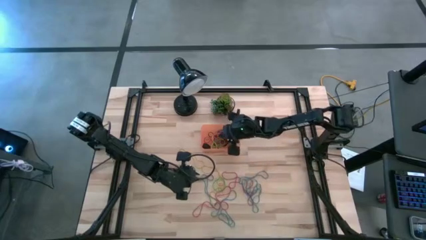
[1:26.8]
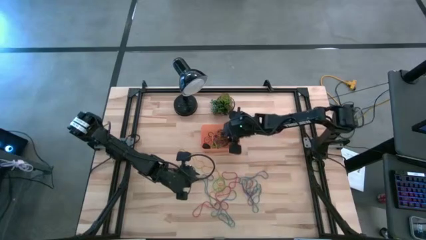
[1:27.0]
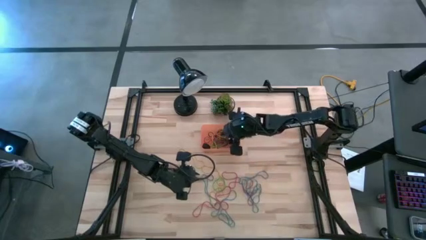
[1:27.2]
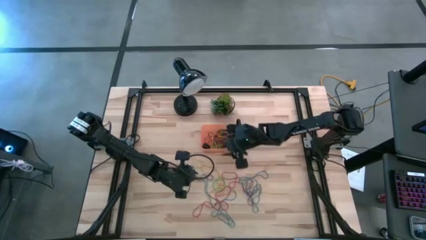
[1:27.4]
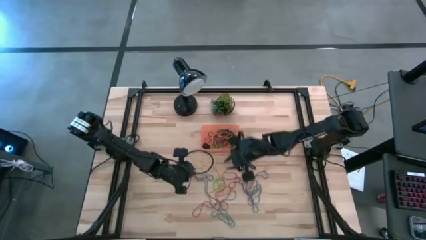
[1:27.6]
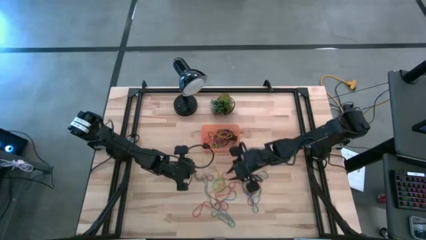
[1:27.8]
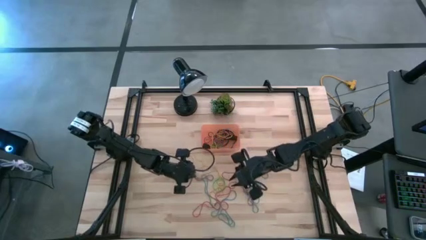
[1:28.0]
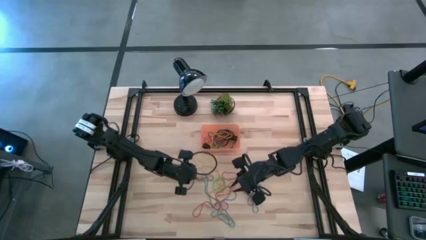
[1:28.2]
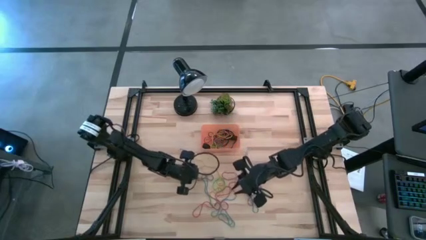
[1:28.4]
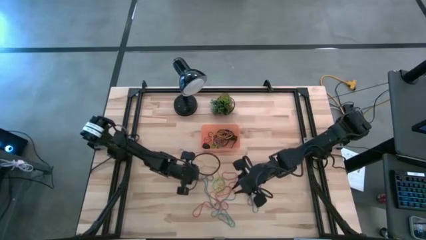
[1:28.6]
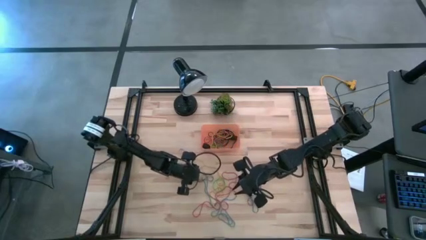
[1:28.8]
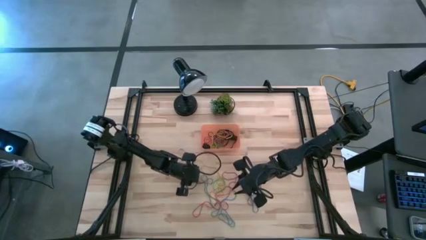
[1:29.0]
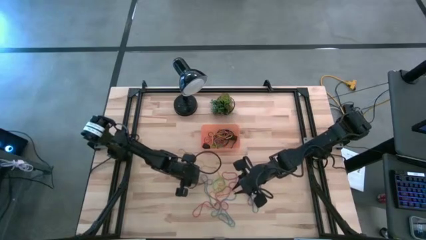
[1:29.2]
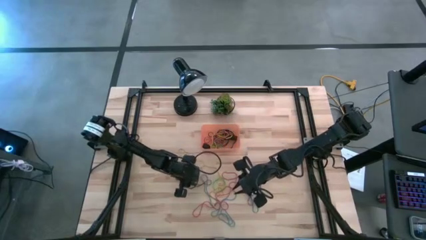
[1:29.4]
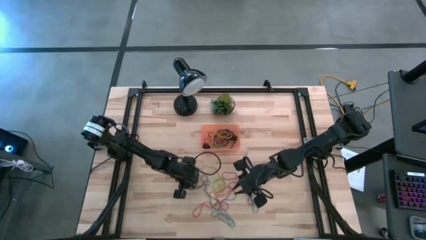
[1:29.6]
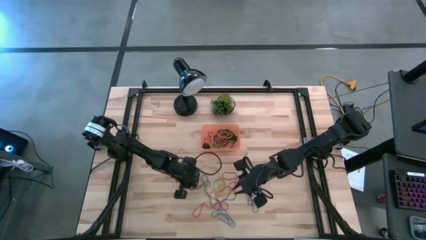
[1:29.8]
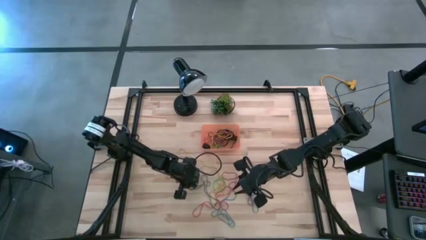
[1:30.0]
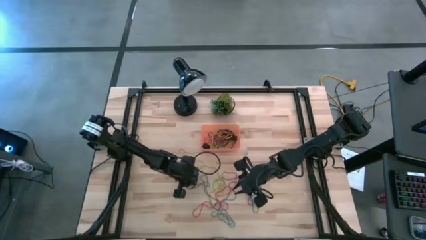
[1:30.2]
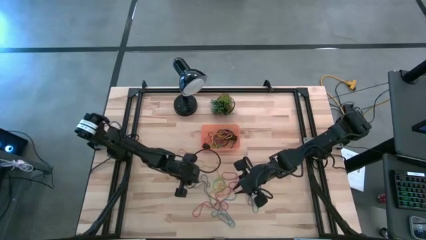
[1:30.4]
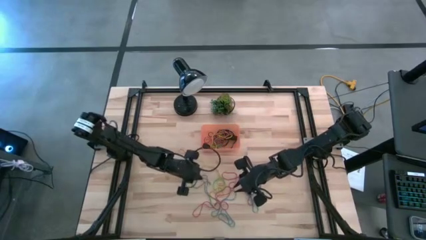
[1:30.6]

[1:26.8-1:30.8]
Task: Pick and place rubber bands into bin
Put the violet rubber band into the orange bin

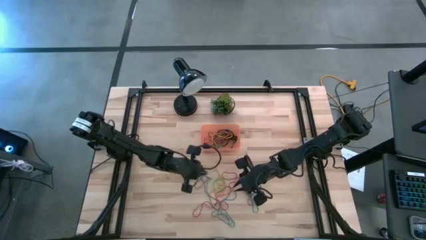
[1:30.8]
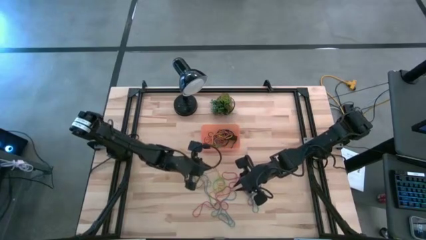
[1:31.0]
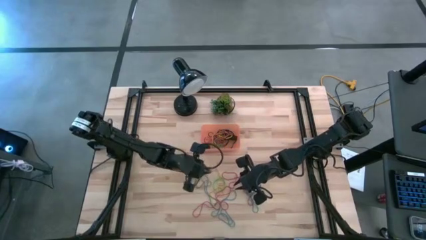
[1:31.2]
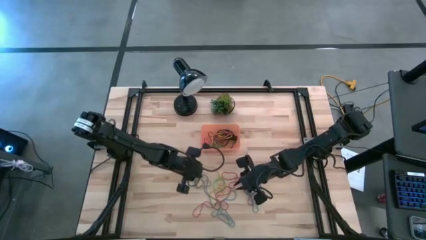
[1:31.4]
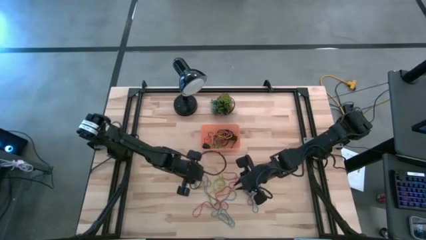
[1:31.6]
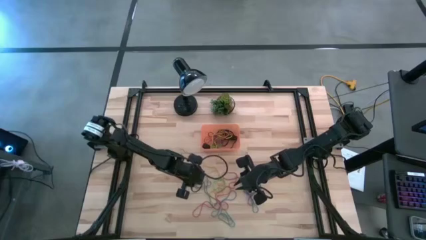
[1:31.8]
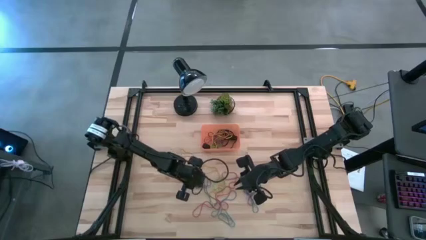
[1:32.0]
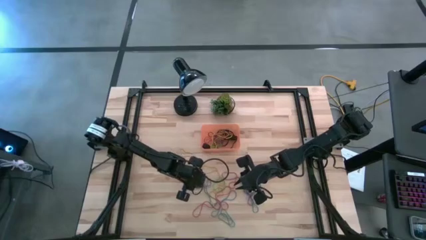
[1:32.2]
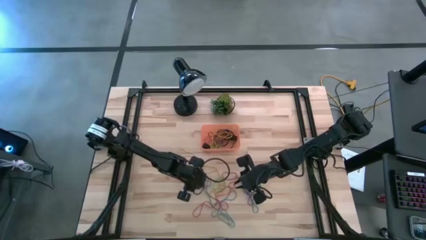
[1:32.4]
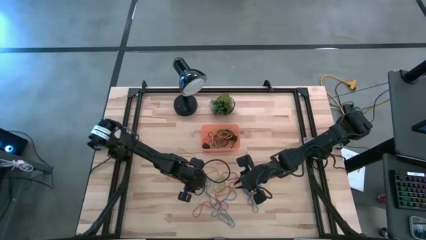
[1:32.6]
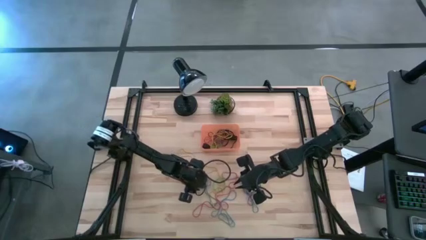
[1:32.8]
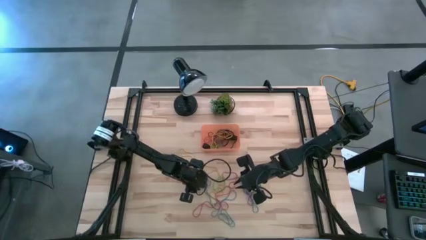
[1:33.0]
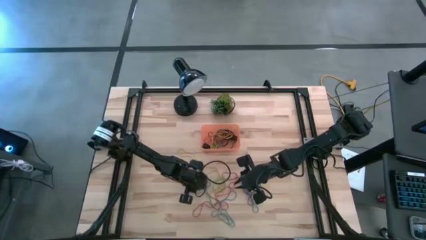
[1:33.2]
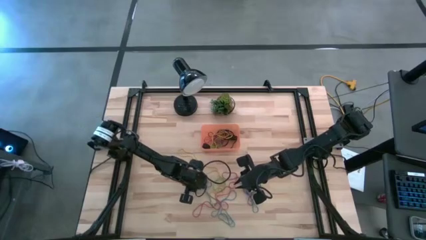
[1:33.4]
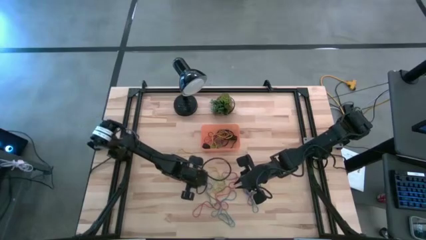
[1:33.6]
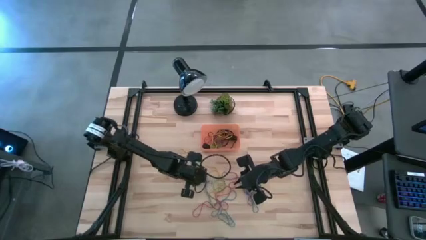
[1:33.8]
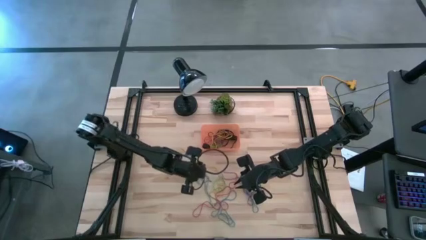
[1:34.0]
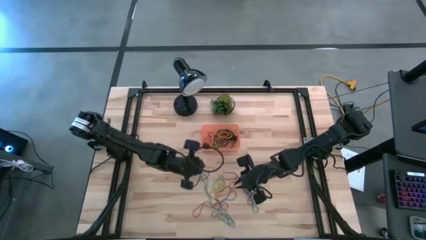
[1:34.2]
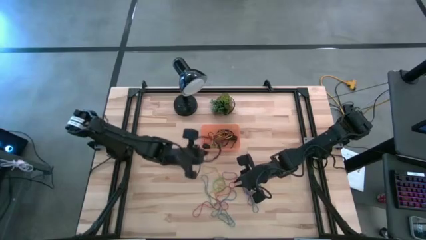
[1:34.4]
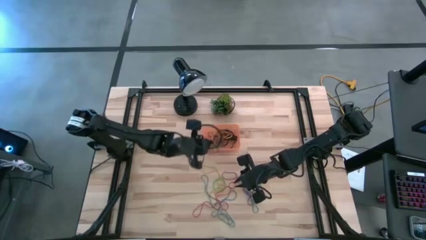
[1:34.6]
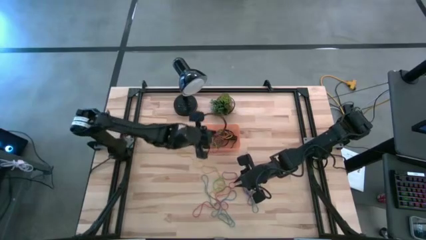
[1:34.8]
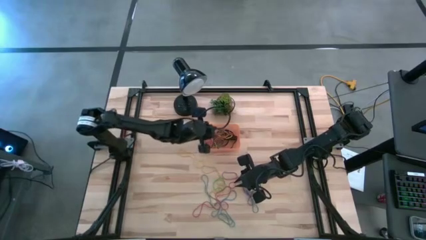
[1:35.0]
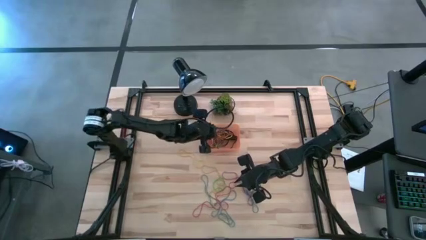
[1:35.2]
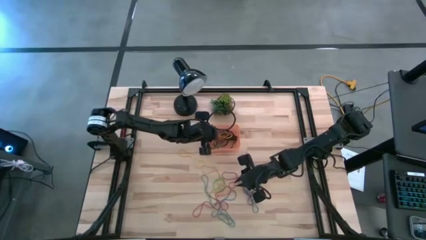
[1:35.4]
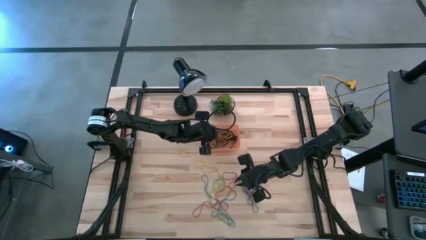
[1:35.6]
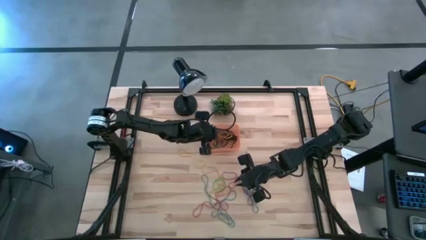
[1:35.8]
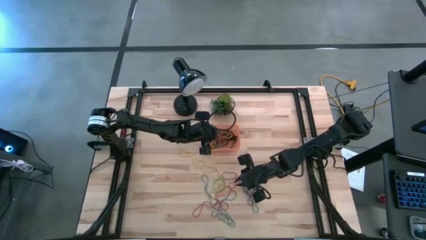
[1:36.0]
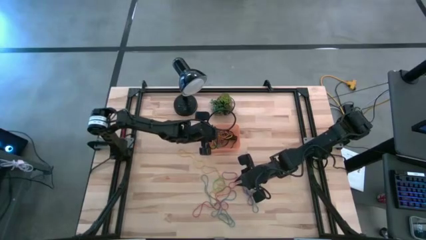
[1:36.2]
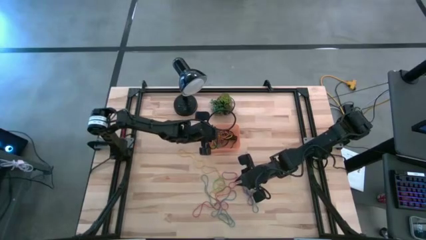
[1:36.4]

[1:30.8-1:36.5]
Put the violet rubber band into the orange bin

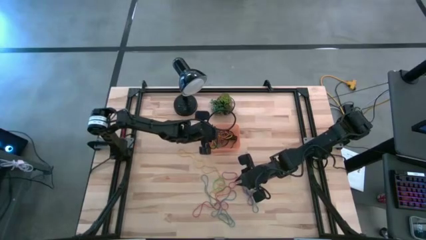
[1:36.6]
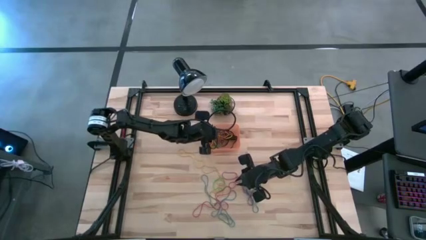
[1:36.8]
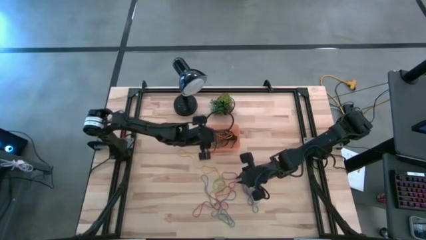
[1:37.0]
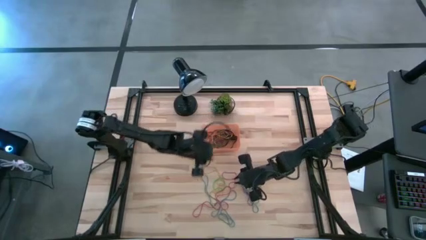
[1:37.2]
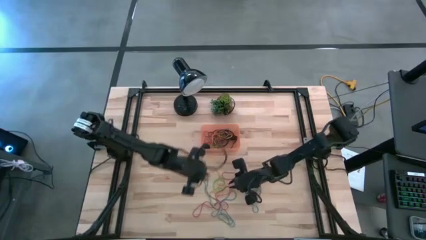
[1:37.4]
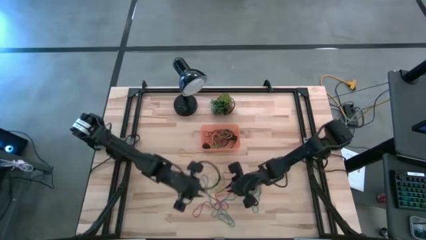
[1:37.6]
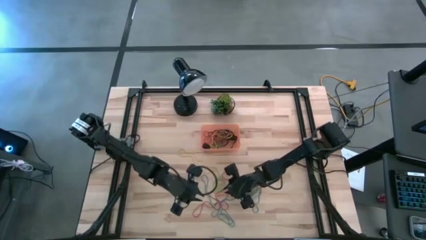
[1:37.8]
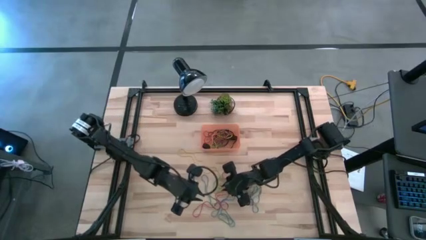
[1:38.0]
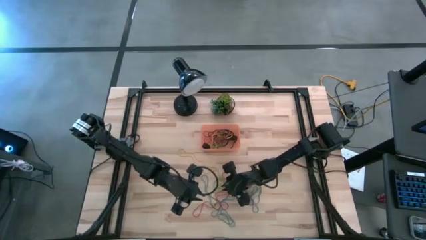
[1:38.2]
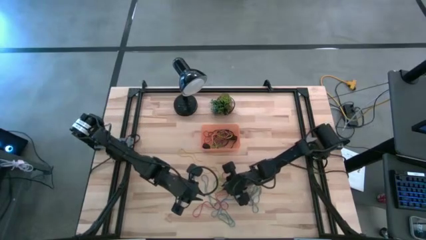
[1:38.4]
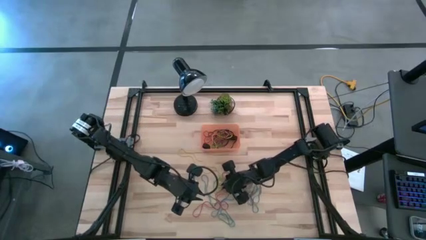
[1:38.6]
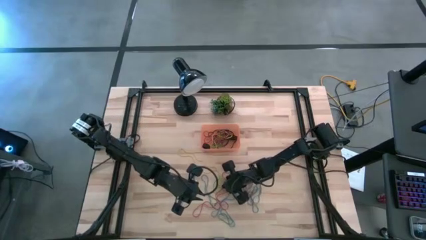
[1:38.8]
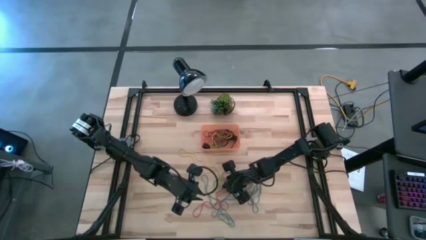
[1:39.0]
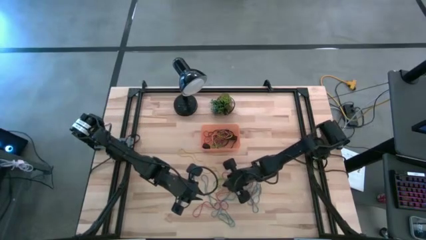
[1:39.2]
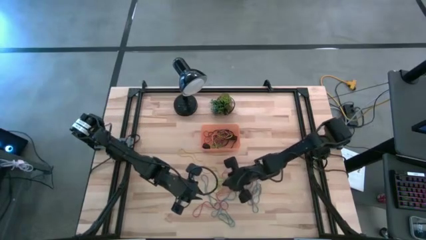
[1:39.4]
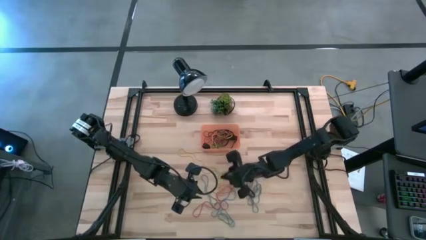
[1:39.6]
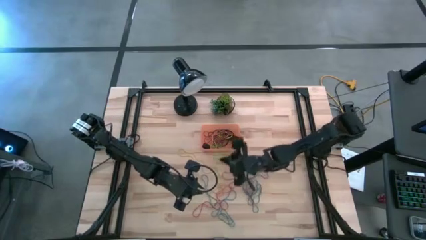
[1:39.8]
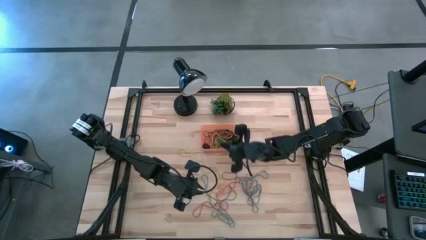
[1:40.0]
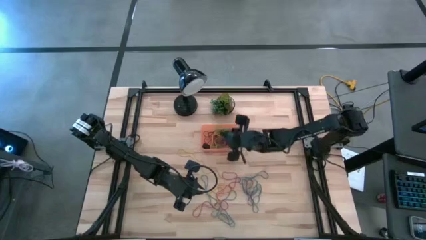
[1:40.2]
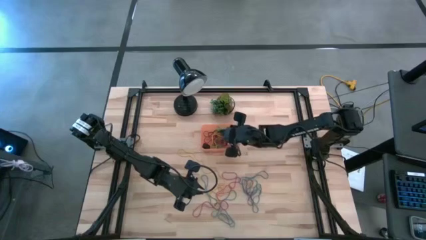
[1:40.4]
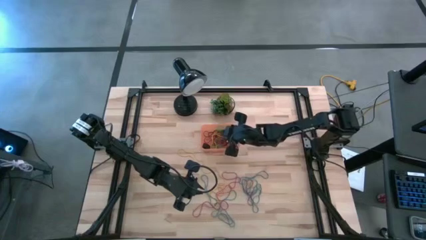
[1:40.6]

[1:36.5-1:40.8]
Put the green rubber band into the orange bin

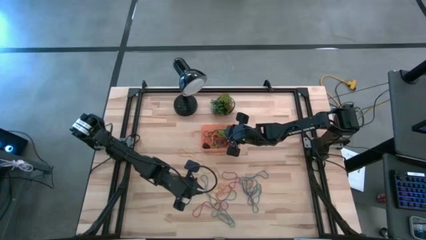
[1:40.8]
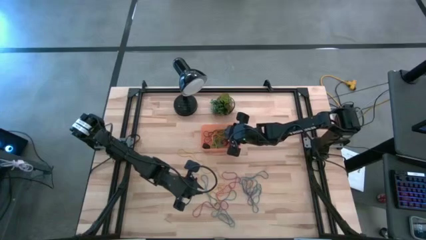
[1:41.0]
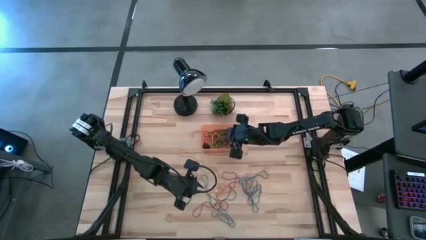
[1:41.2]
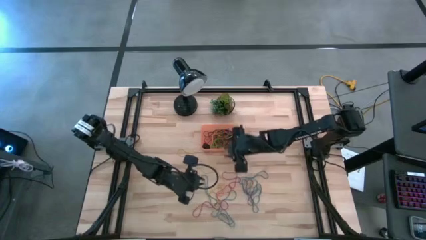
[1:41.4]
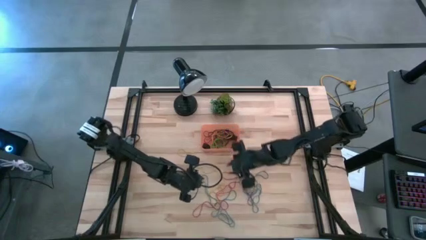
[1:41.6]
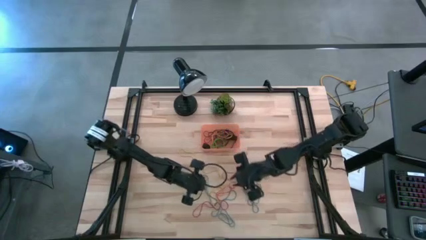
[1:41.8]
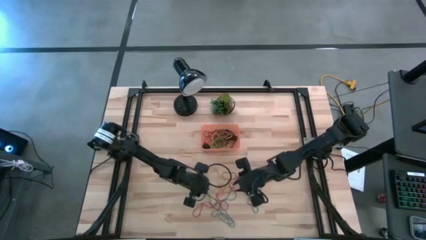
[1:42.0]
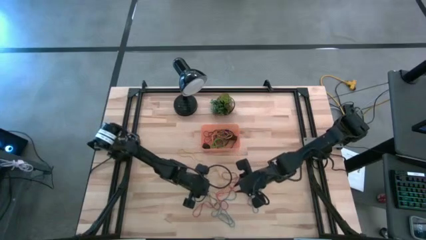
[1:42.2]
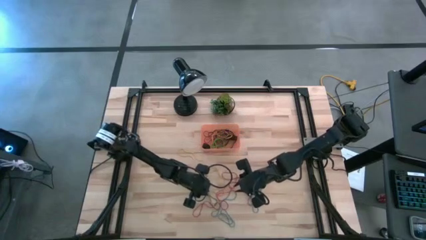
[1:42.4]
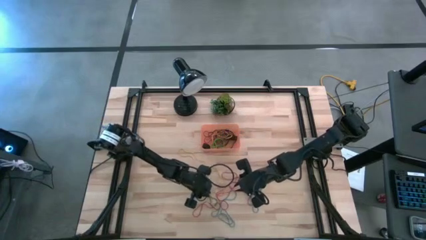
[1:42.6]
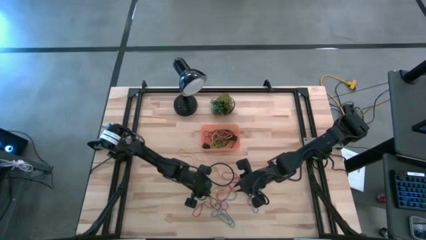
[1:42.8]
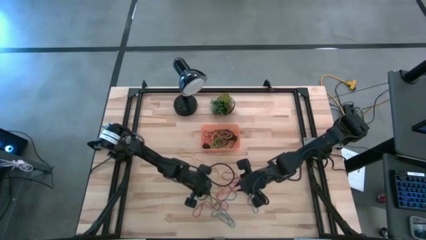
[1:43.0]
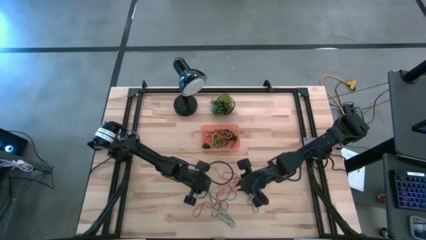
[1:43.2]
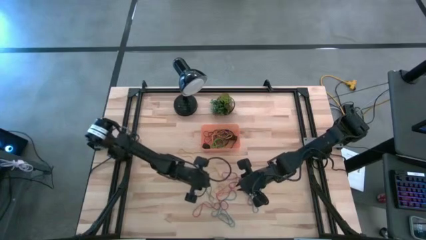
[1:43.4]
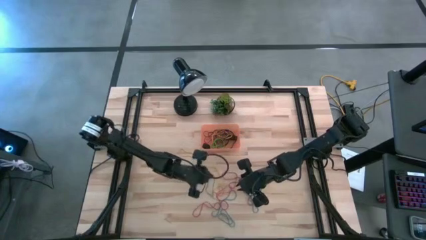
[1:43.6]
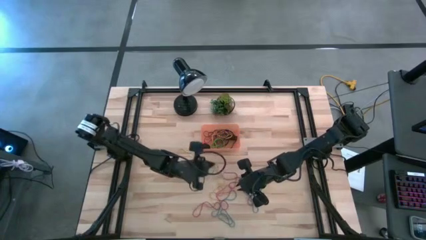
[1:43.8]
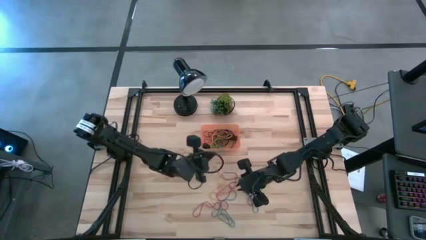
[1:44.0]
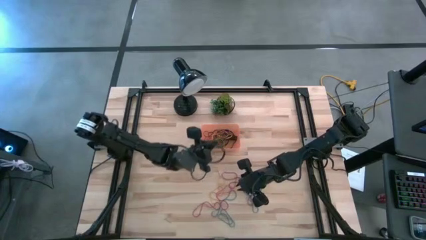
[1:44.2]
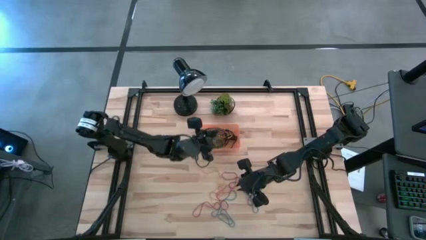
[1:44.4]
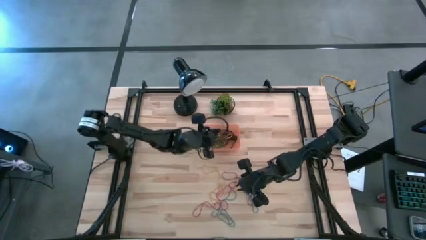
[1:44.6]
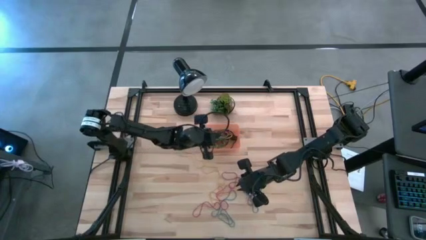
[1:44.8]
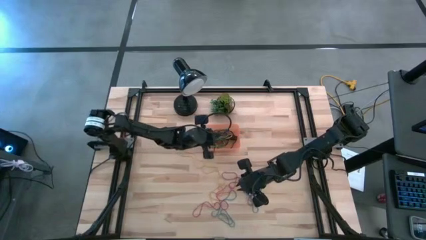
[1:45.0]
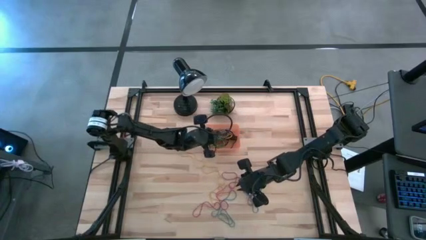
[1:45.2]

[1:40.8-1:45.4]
Put the blue rubber band into the orange bin
